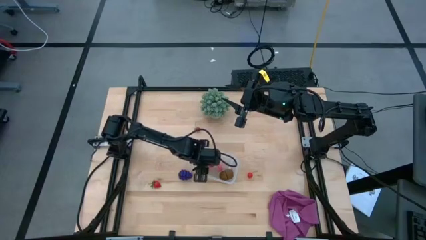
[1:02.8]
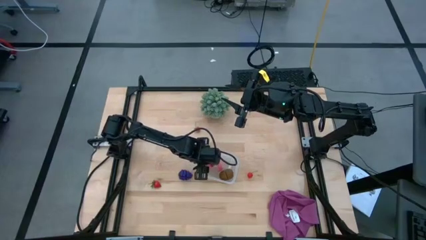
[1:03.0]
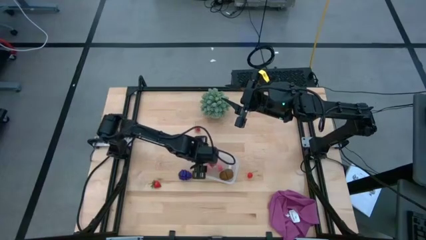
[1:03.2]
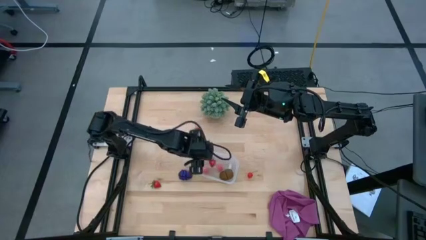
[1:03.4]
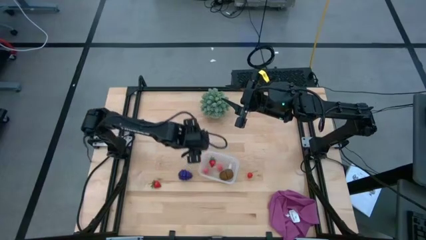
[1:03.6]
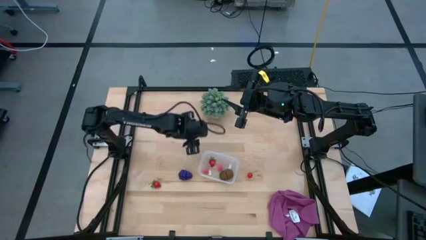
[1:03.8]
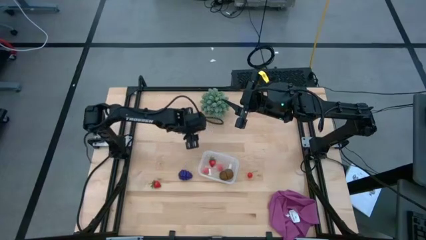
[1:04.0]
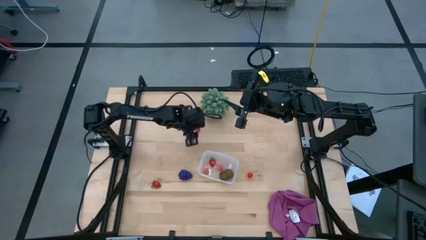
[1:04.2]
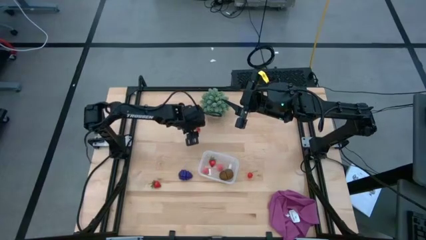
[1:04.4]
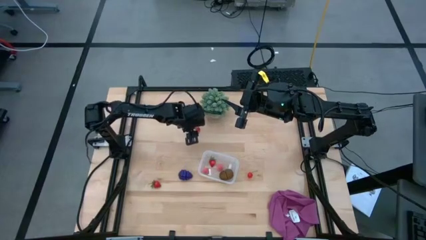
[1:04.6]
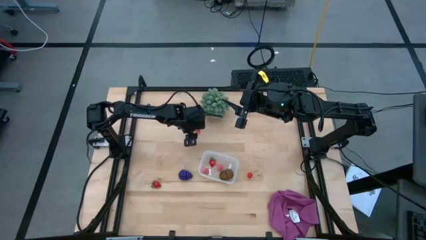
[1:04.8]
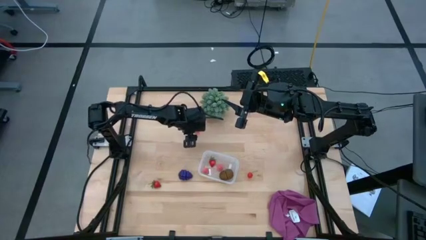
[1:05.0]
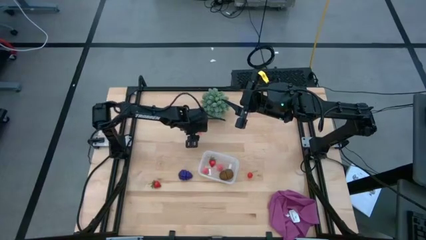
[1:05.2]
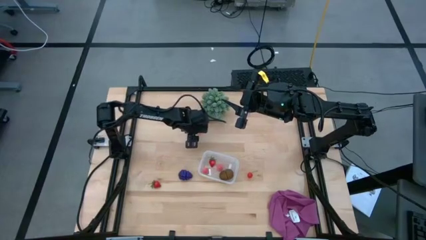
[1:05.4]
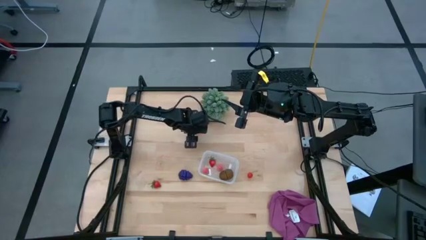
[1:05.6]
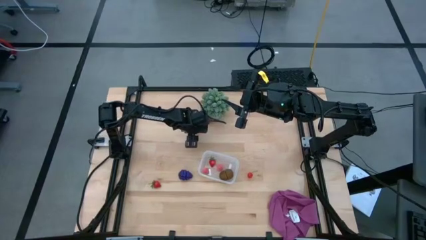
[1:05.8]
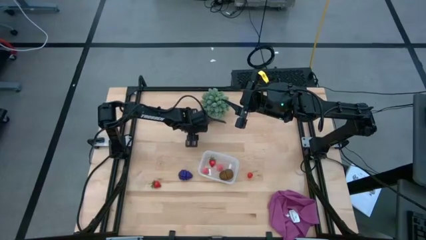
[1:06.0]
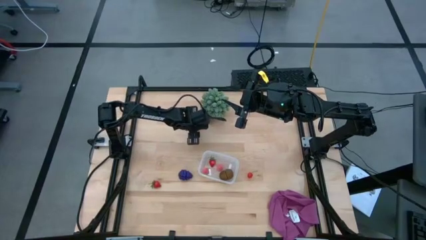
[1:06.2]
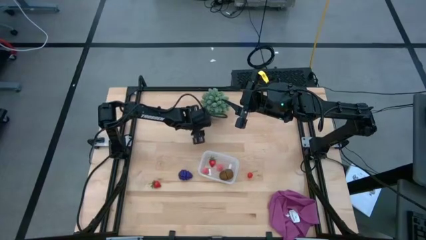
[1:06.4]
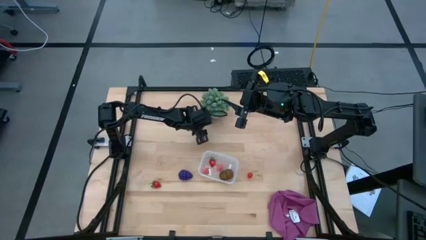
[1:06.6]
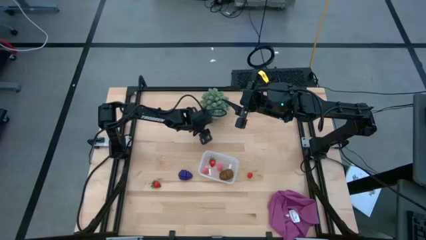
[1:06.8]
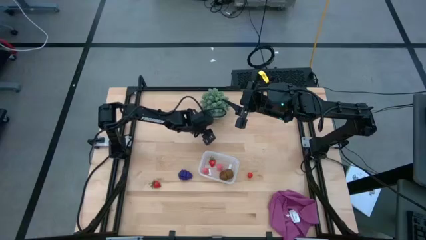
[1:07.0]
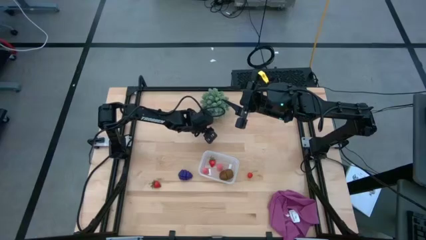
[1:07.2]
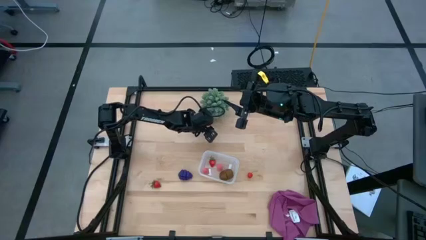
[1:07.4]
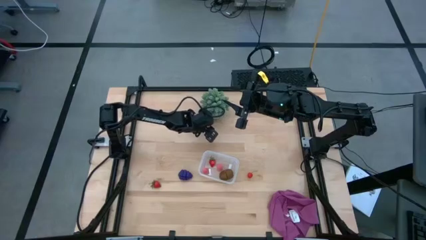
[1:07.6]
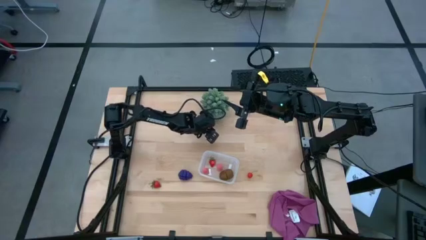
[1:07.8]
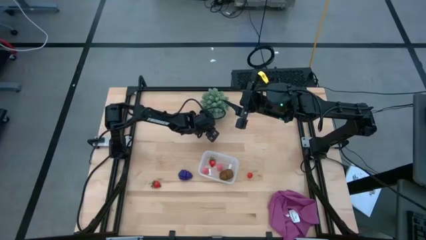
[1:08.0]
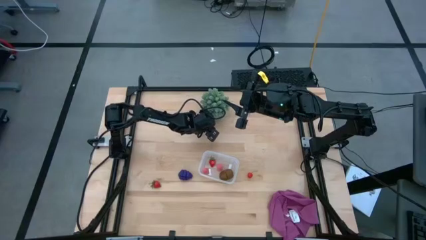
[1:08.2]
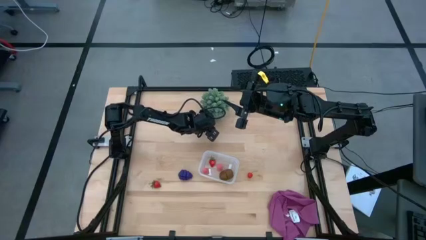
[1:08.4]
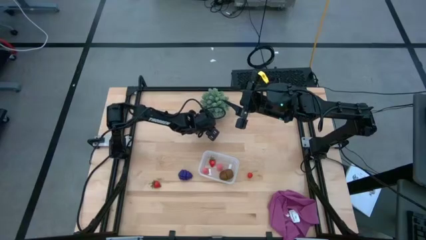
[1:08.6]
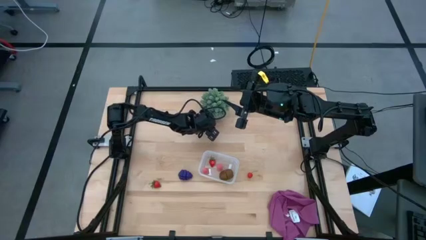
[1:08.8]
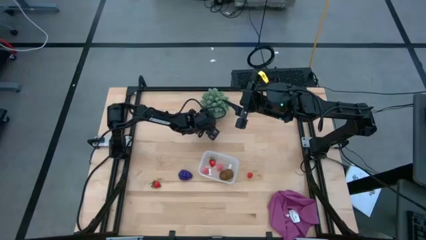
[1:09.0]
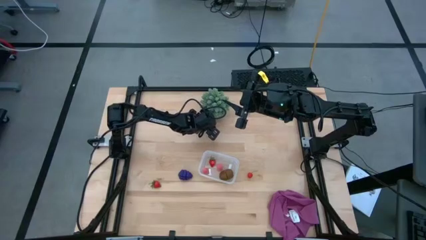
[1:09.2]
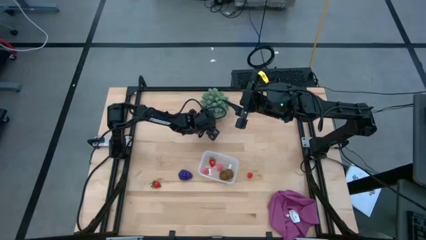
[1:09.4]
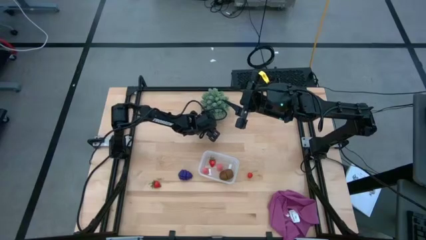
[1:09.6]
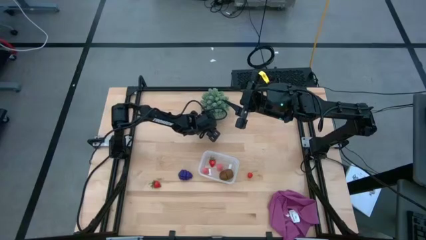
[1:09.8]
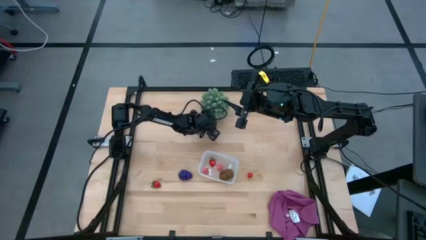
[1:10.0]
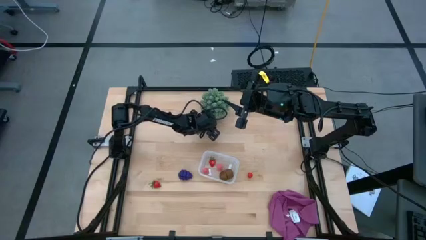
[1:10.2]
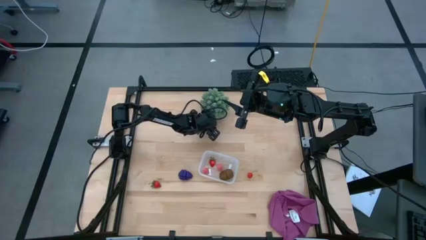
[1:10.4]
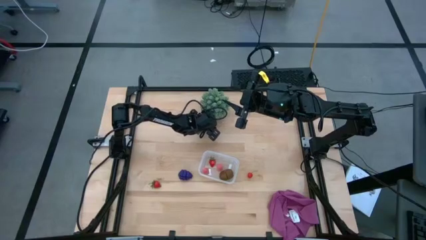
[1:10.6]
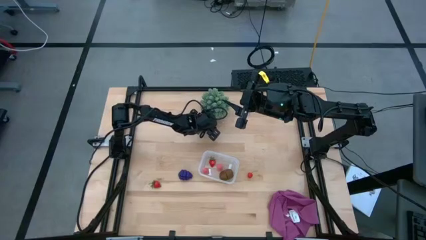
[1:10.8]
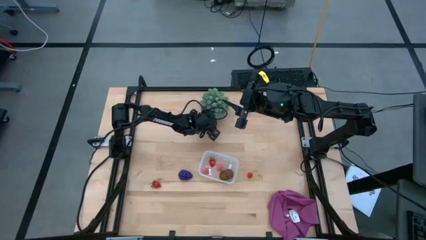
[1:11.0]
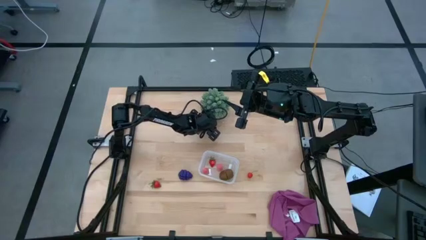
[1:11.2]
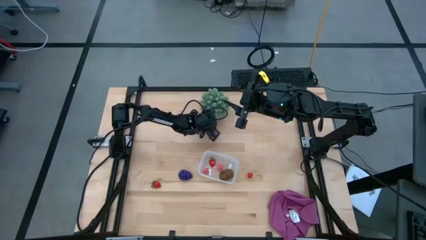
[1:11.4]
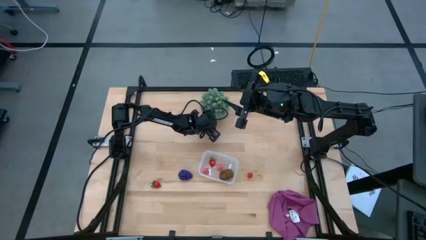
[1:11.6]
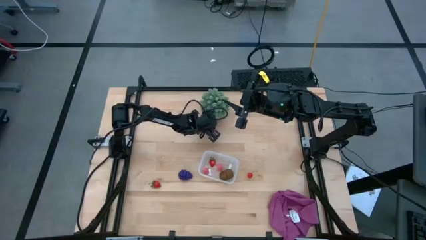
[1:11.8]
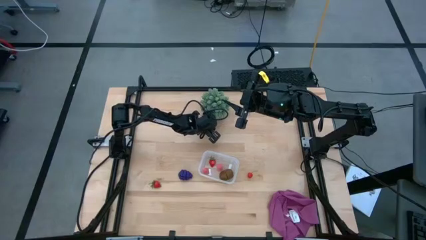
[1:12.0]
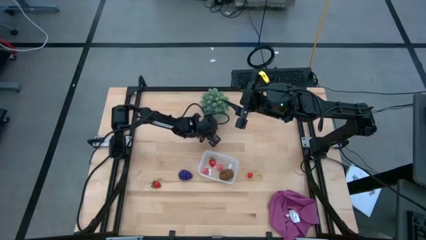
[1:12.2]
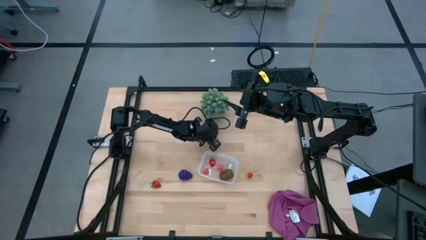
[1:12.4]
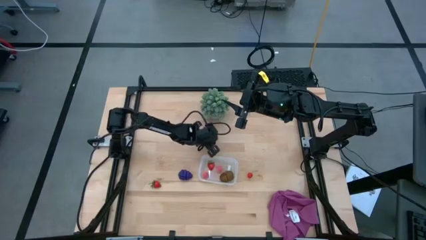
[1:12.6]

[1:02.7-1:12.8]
Task: Pick and placing Produce into tupperware
Put the top red strawberry into the bin

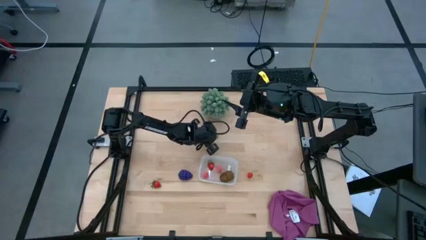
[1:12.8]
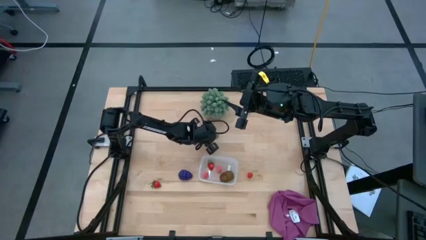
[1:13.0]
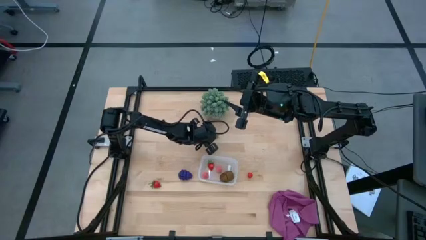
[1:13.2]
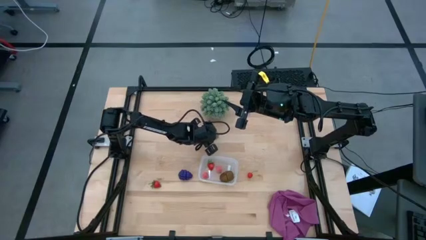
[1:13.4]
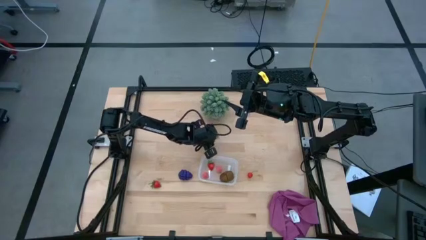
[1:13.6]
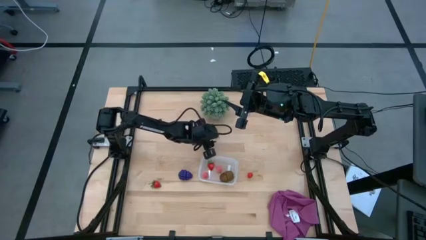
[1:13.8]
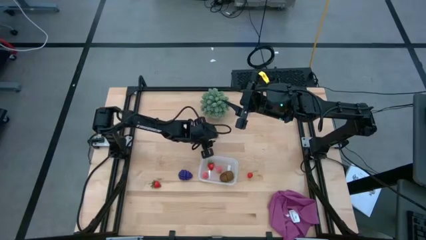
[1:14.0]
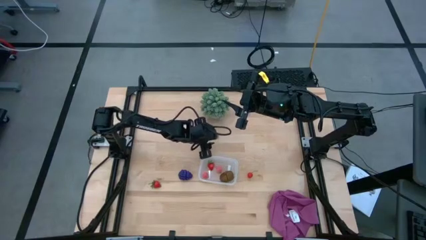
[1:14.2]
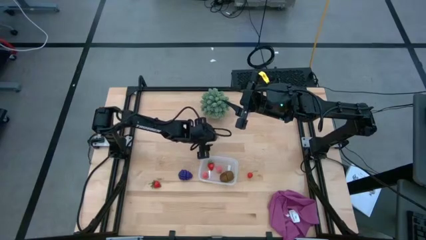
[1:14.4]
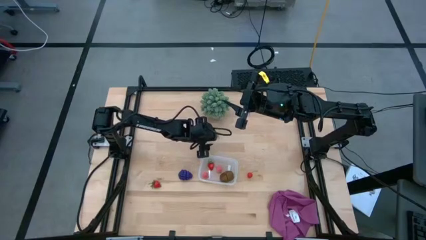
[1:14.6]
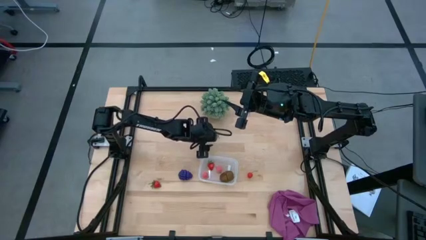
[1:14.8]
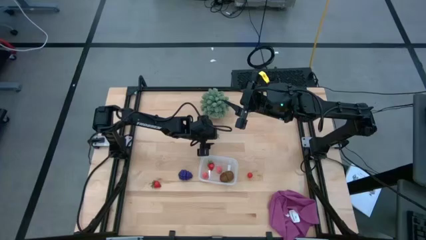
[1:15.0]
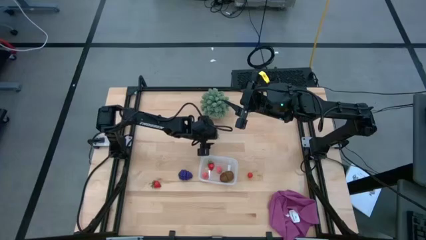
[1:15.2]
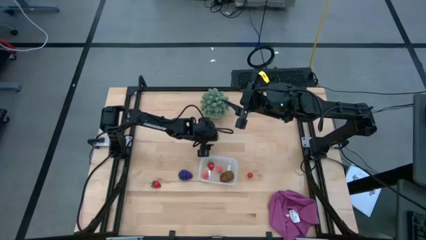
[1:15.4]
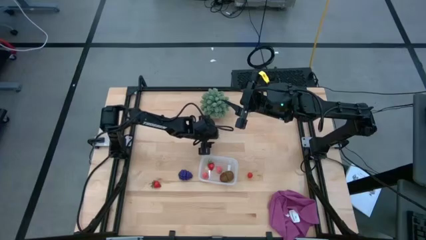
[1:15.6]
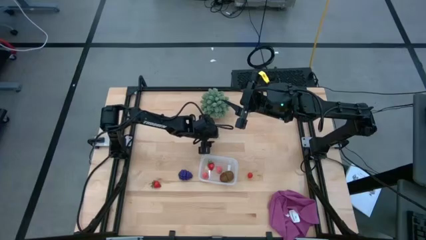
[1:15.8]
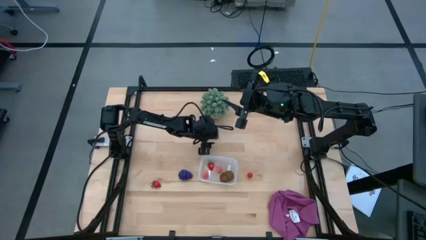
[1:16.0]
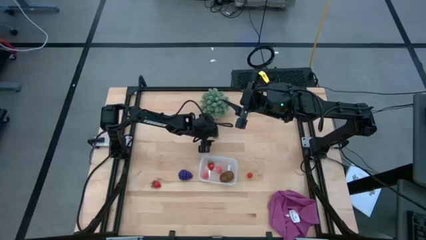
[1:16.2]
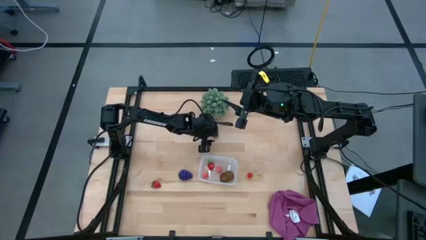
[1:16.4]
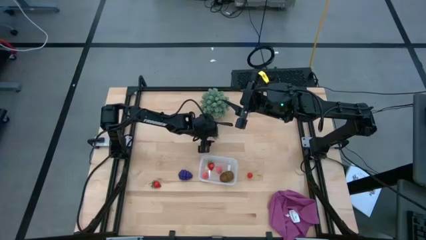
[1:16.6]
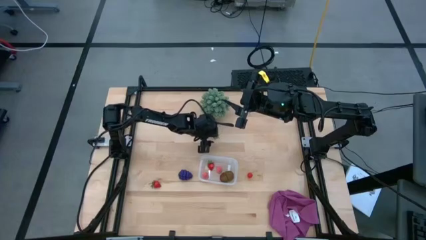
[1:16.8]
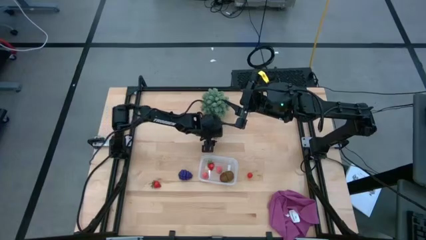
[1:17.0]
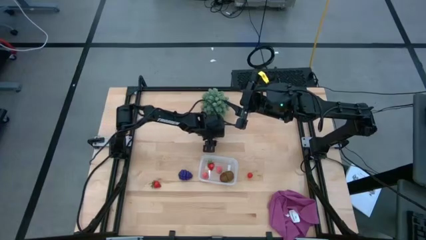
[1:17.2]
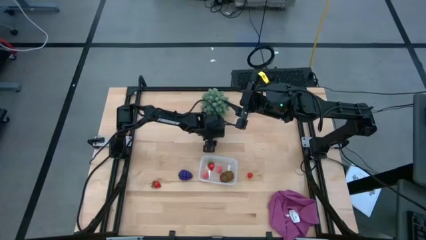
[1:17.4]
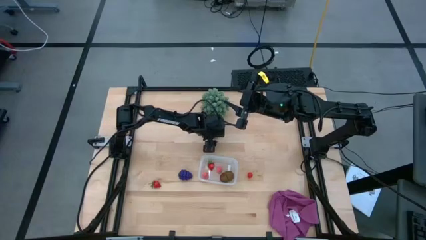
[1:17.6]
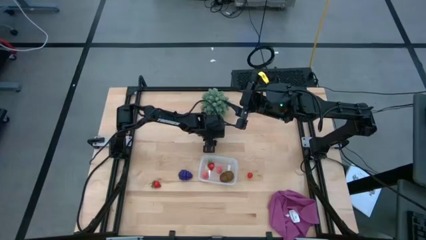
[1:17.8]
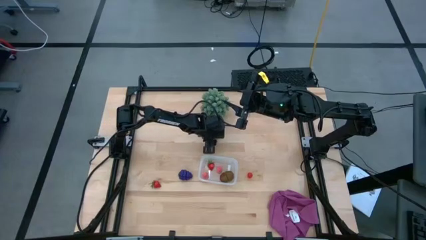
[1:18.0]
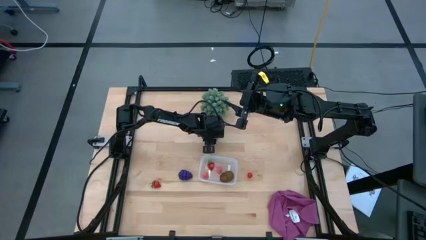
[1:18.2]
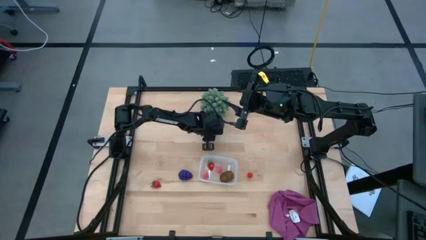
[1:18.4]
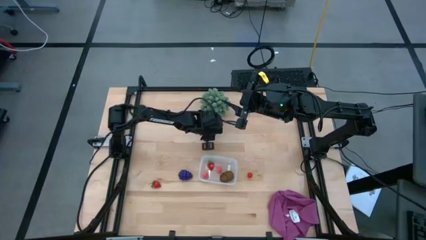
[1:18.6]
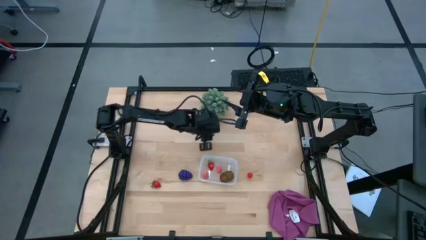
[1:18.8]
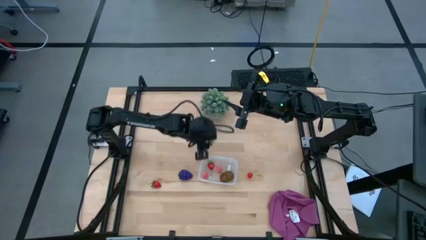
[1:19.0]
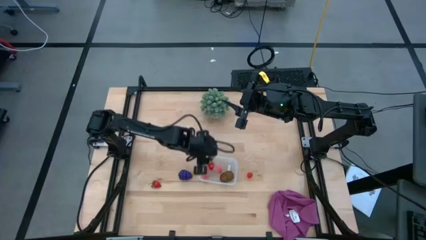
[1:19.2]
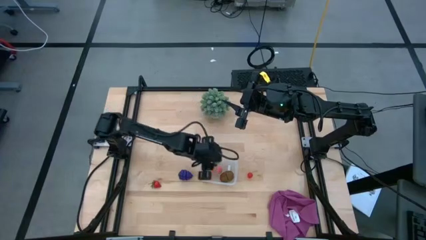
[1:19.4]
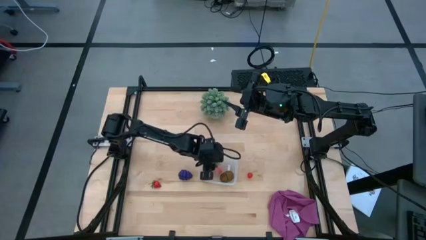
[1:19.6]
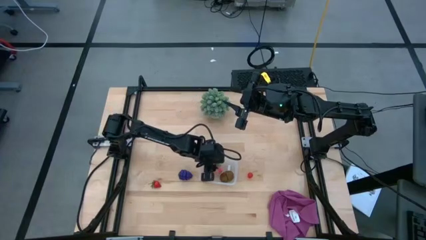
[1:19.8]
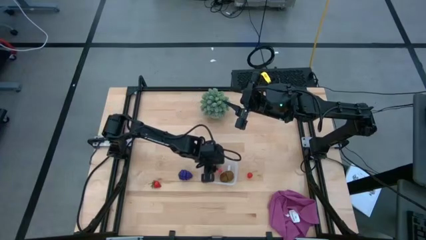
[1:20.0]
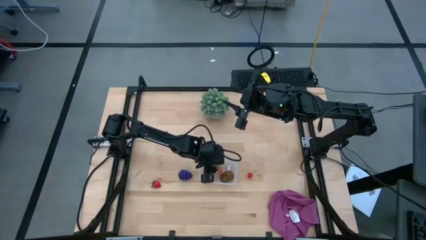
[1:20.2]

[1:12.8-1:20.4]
Put the red strawberry into the bin
